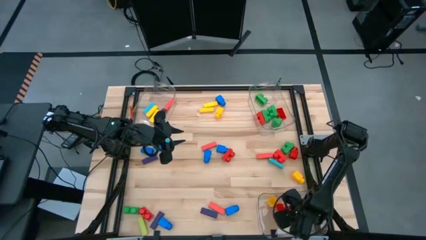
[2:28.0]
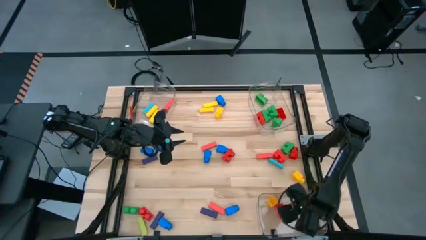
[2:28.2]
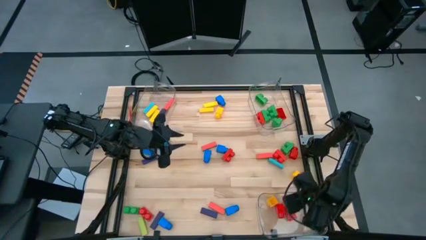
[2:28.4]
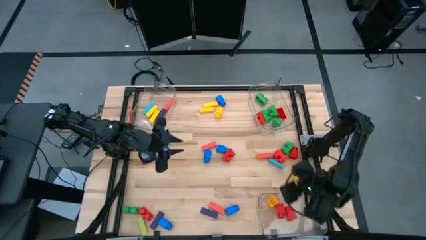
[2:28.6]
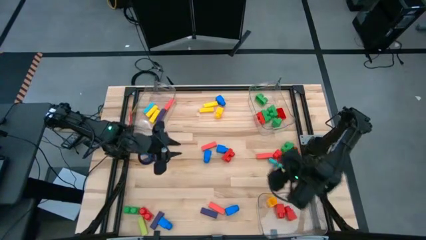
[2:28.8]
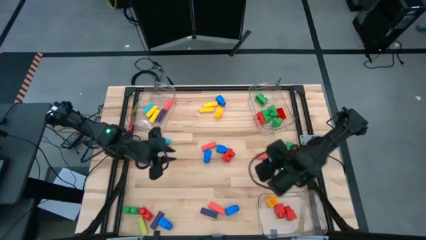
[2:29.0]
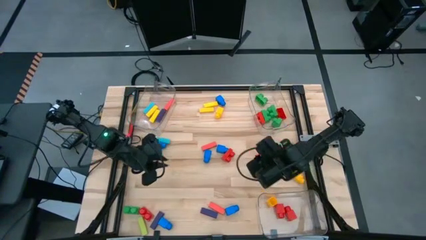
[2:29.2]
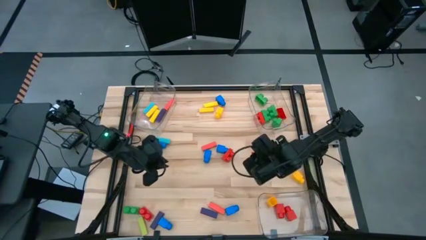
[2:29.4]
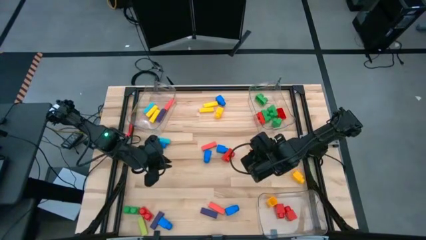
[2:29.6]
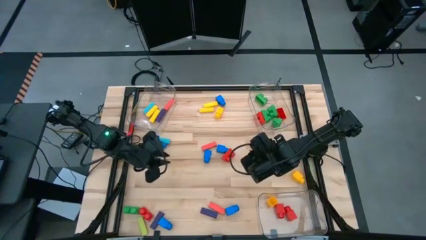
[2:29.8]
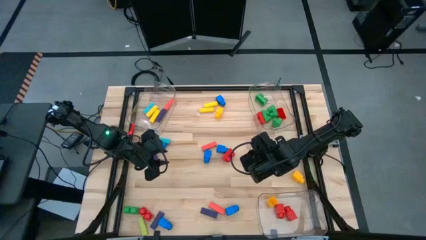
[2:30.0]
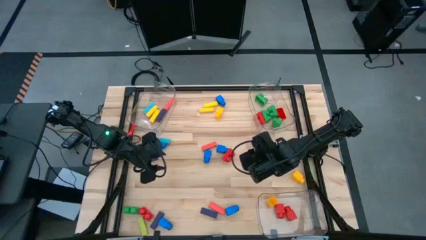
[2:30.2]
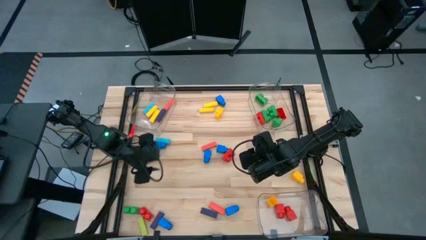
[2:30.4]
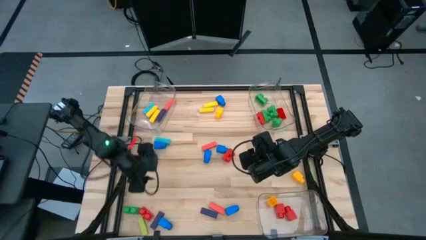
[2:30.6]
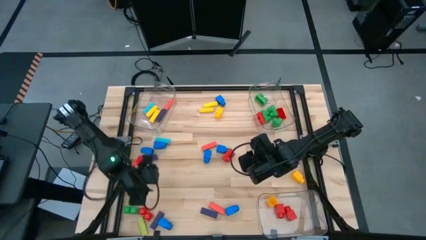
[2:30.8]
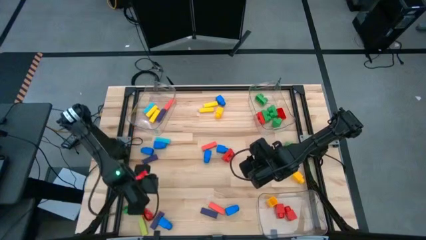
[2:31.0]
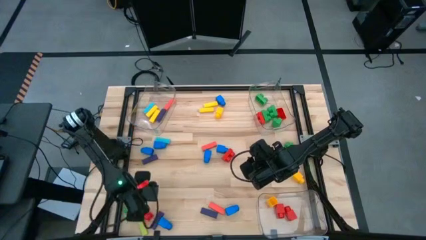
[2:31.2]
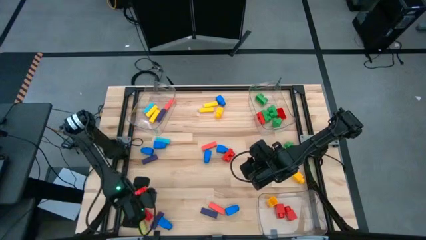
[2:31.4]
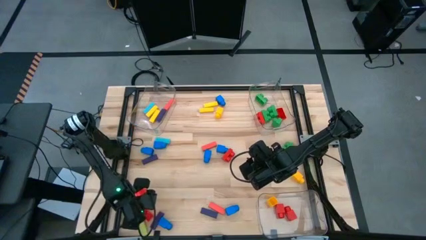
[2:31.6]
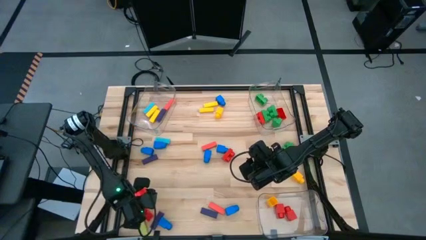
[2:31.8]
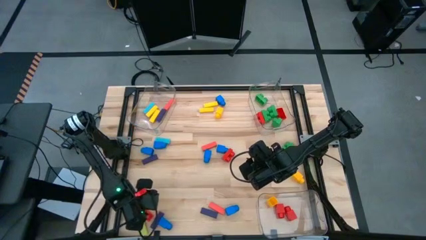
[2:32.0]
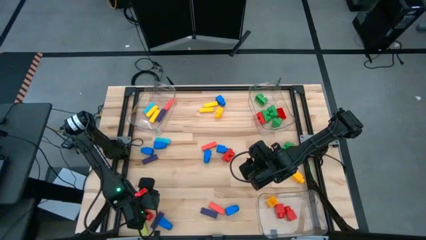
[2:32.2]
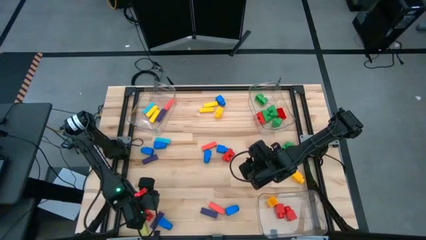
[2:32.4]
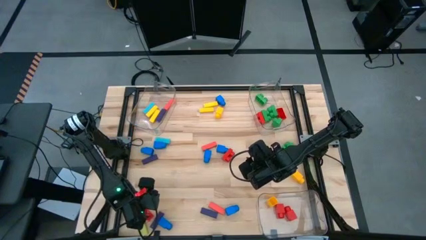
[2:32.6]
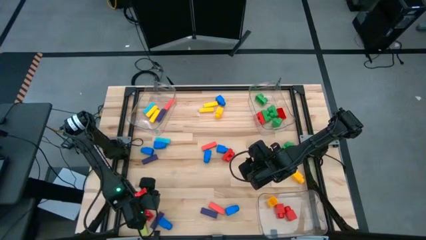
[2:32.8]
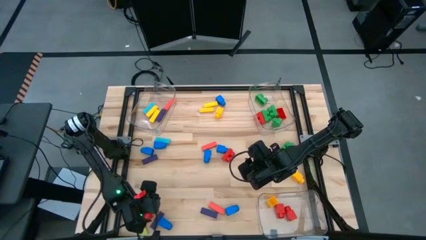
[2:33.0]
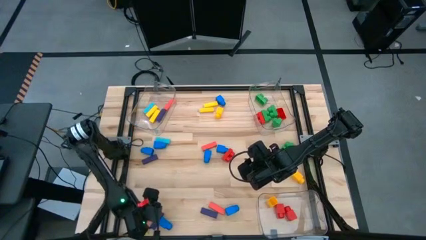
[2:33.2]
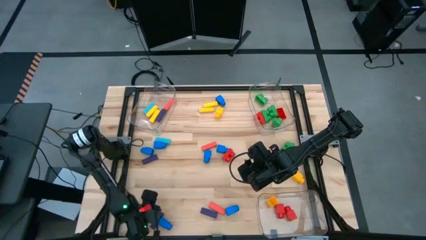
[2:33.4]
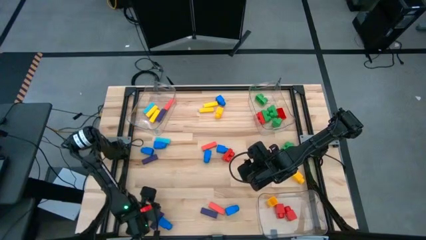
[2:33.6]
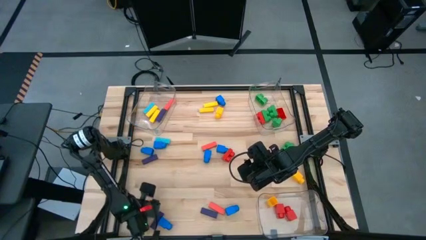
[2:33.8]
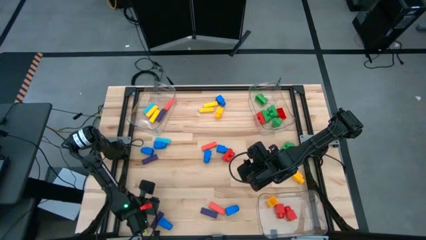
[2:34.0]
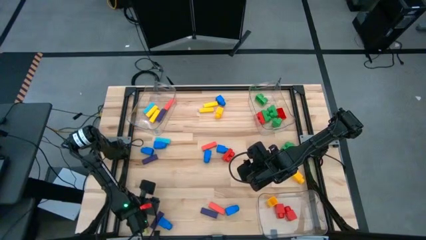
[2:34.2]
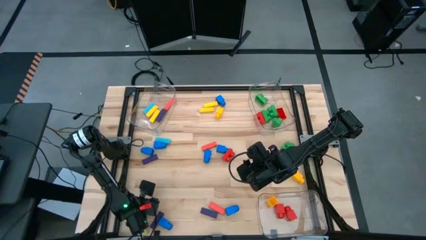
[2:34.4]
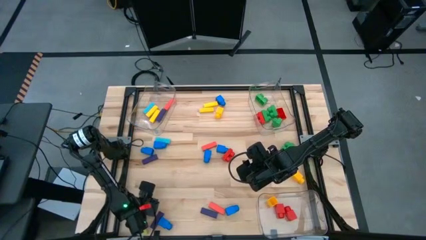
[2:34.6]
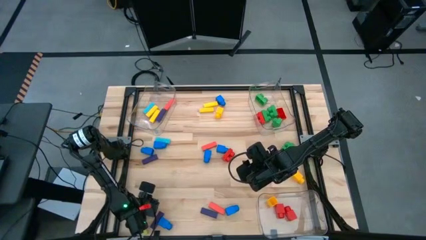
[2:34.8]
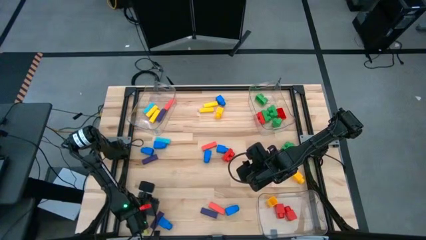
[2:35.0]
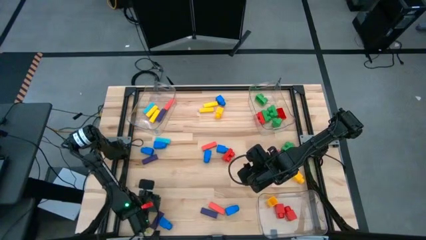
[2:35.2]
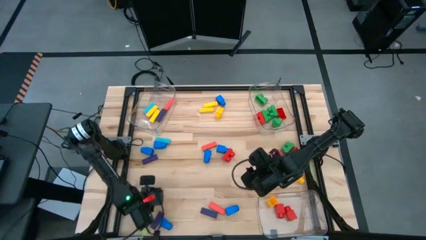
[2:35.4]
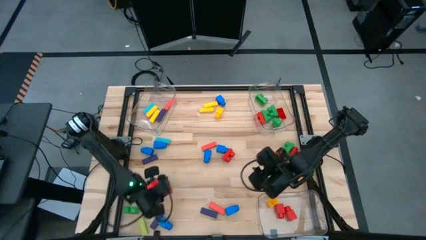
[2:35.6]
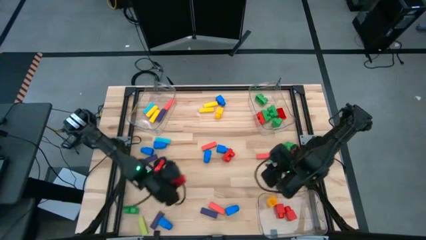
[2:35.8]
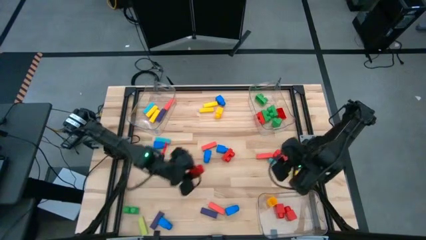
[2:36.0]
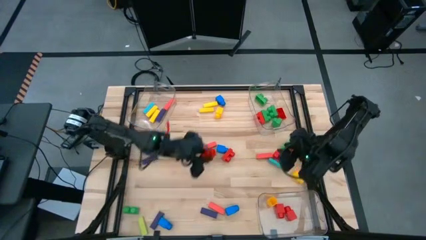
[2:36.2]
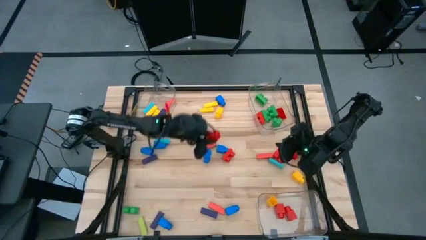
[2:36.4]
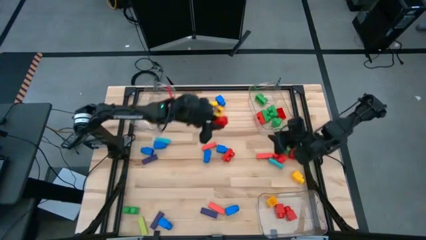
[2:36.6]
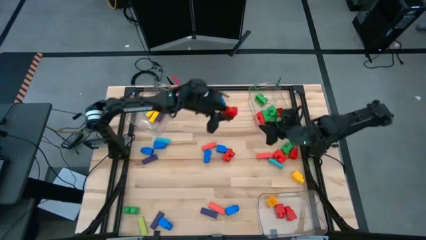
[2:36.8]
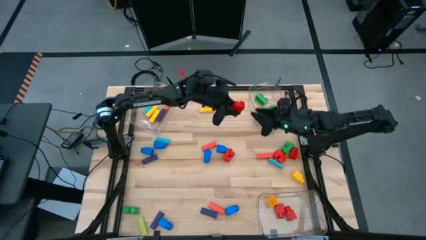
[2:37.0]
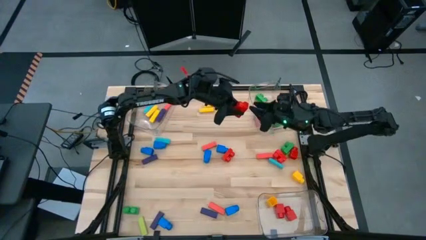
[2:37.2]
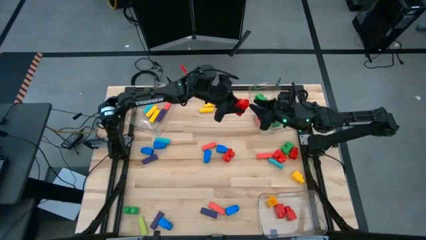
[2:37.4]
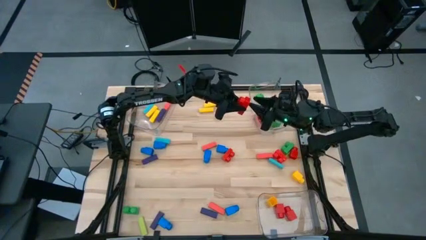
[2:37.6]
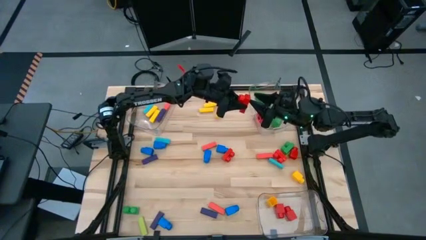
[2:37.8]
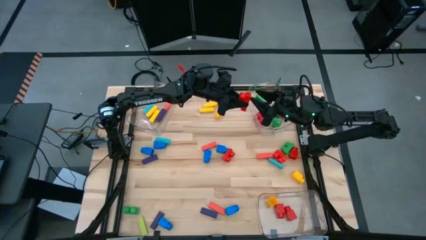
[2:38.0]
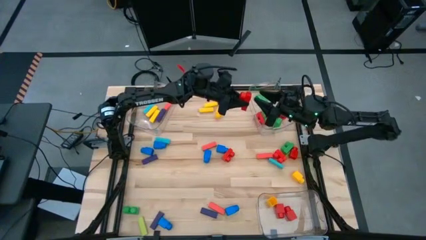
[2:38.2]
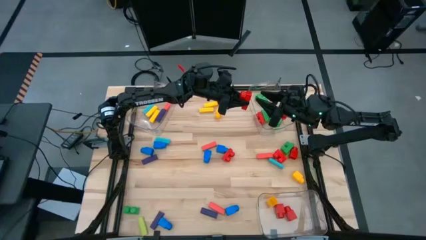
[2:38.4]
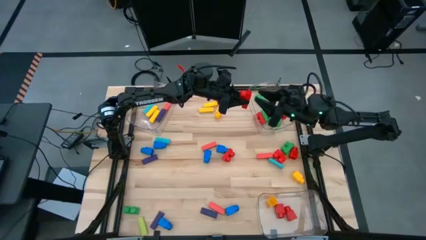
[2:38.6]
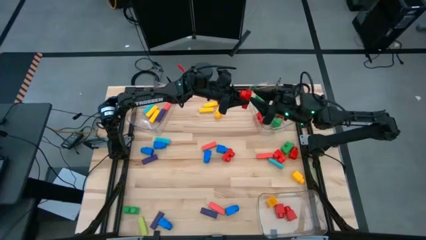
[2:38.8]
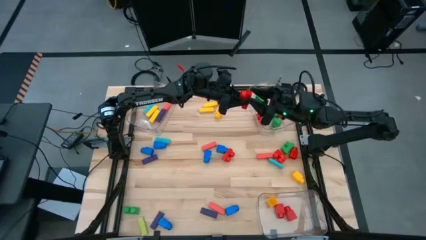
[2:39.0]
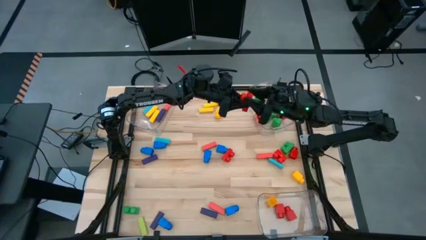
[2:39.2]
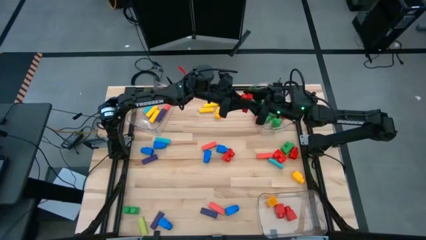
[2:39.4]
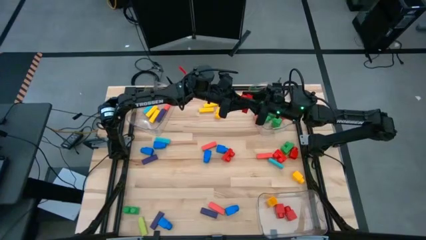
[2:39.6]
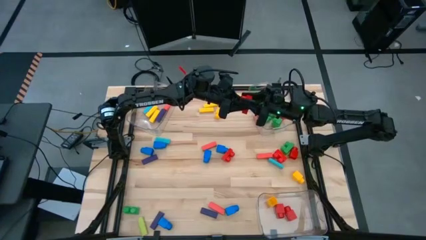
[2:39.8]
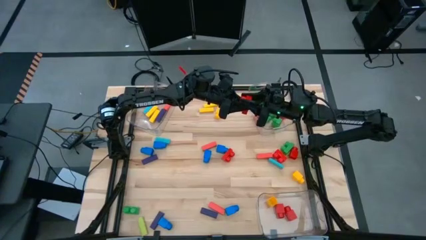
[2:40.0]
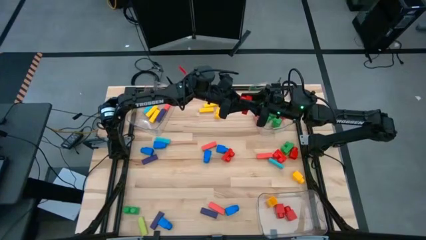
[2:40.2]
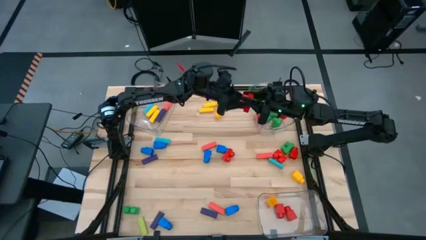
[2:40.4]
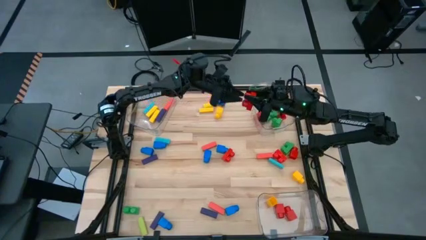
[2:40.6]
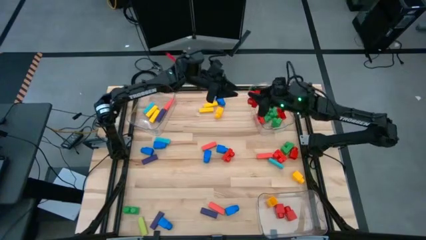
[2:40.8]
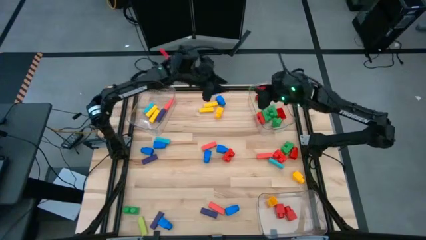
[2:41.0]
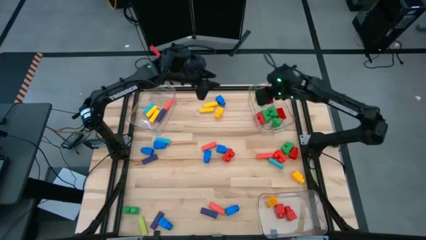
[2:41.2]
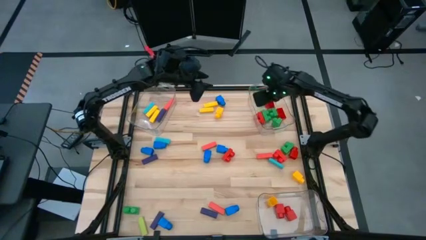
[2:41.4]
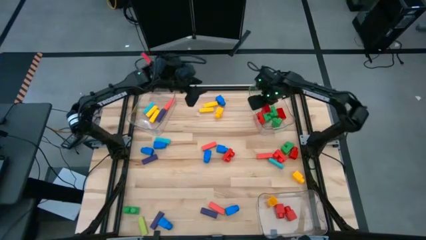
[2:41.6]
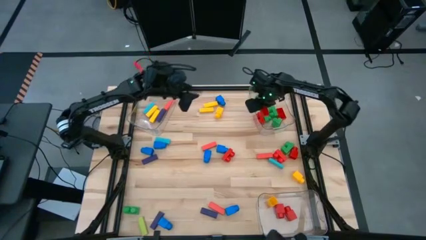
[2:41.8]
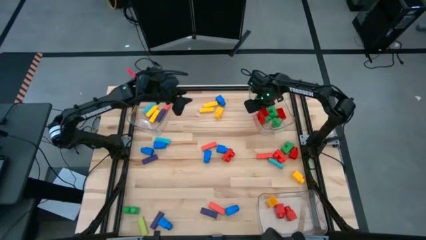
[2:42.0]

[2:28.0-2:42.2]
Task: Sort blocks by size
Put the red 2 stud game piece into the top right transparent bin
